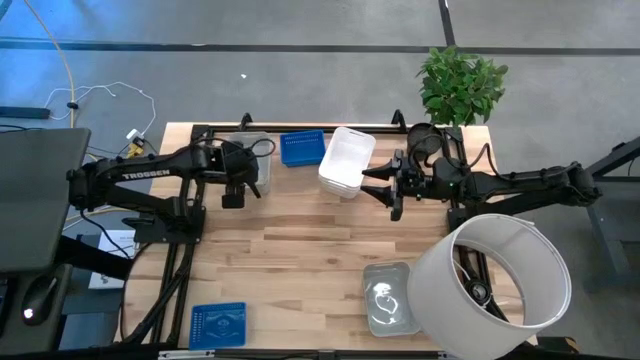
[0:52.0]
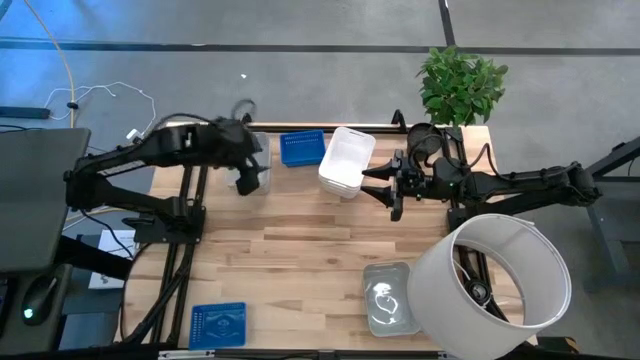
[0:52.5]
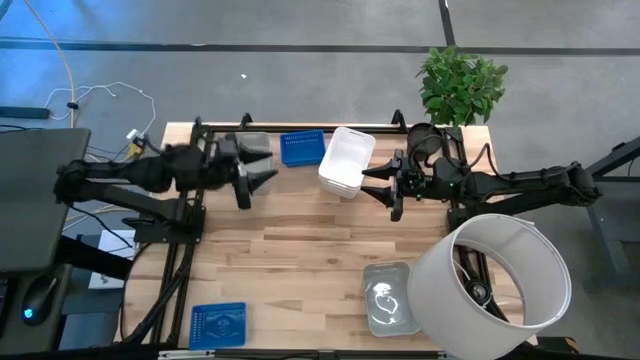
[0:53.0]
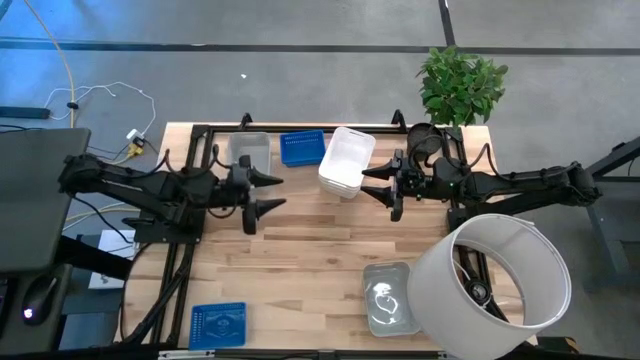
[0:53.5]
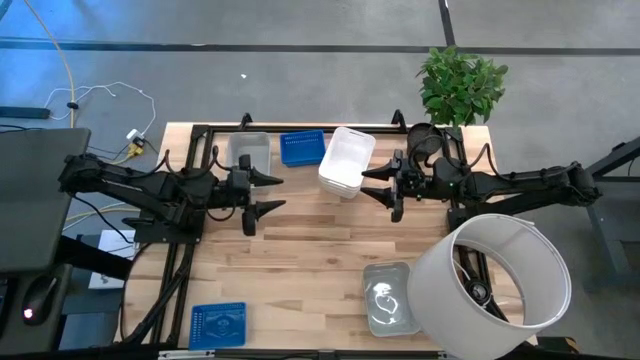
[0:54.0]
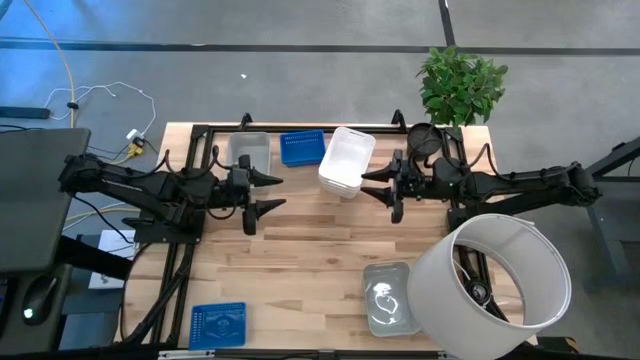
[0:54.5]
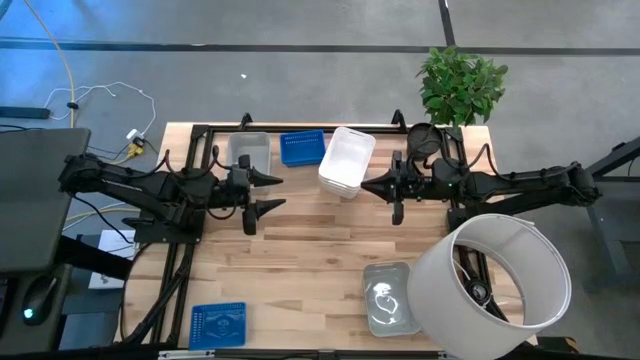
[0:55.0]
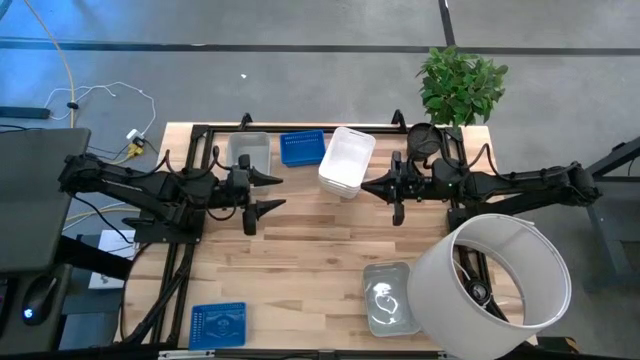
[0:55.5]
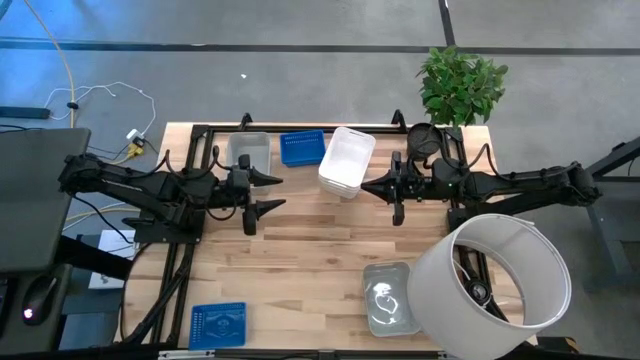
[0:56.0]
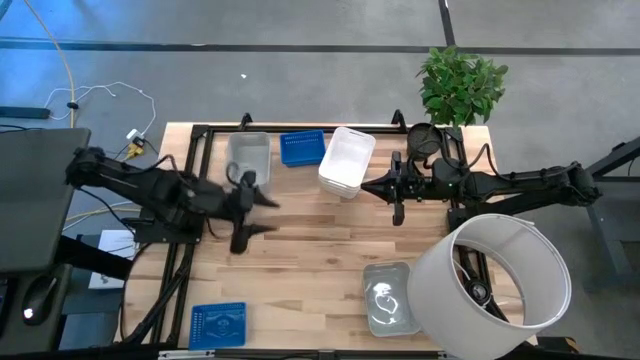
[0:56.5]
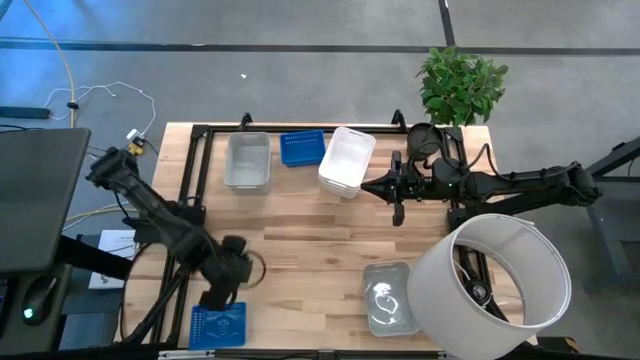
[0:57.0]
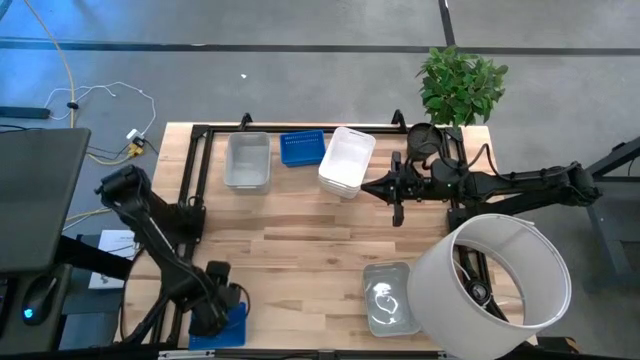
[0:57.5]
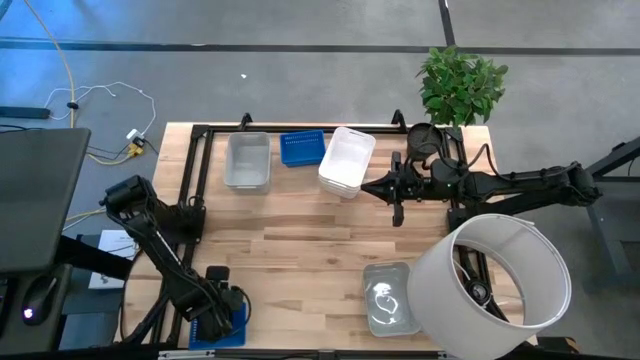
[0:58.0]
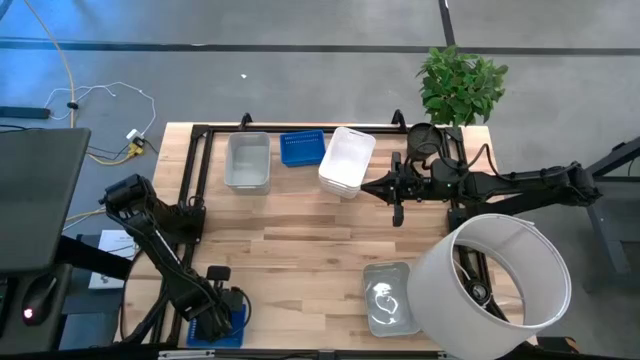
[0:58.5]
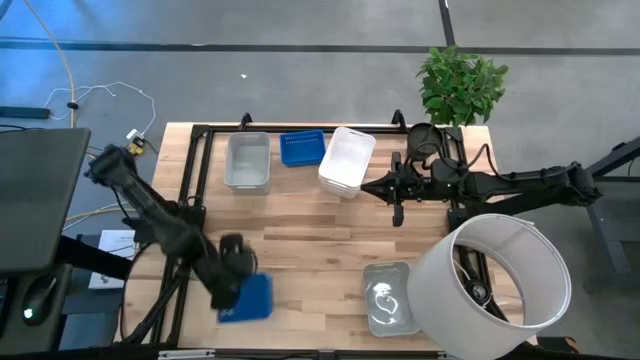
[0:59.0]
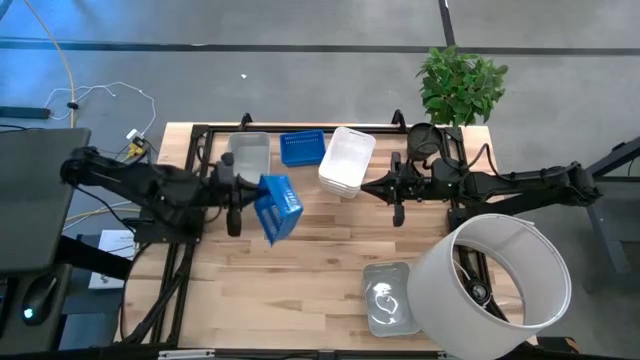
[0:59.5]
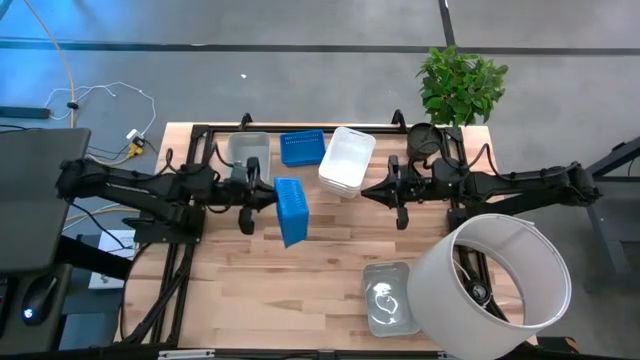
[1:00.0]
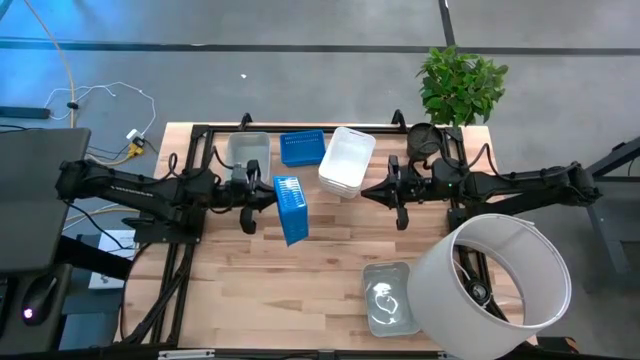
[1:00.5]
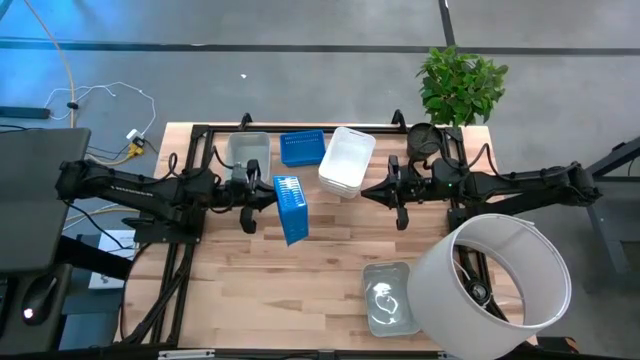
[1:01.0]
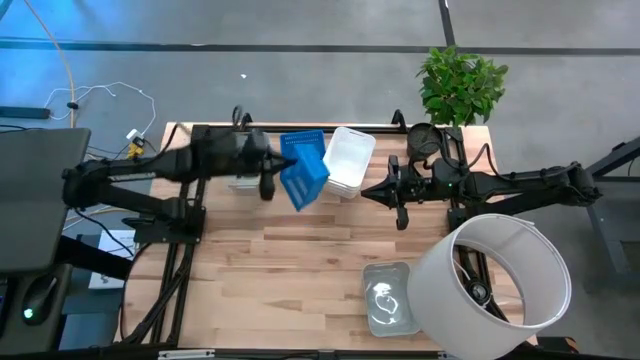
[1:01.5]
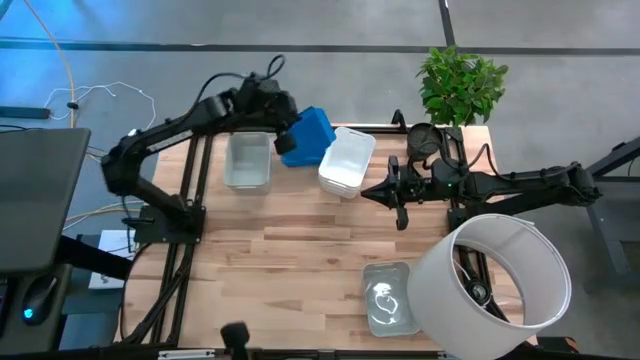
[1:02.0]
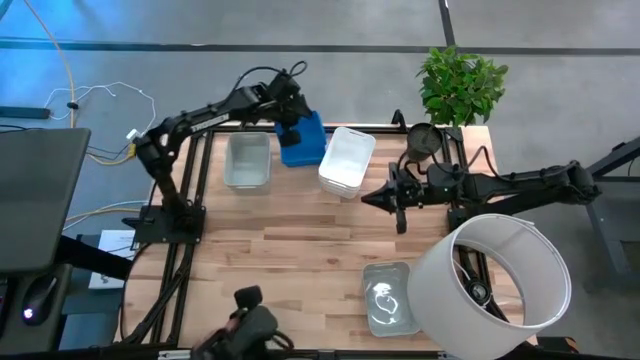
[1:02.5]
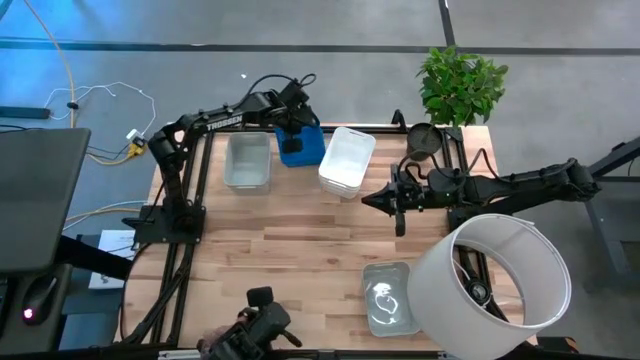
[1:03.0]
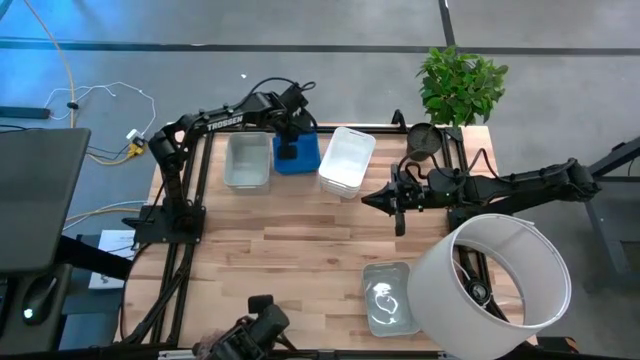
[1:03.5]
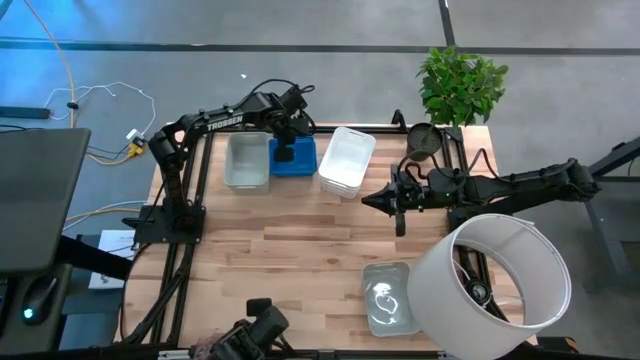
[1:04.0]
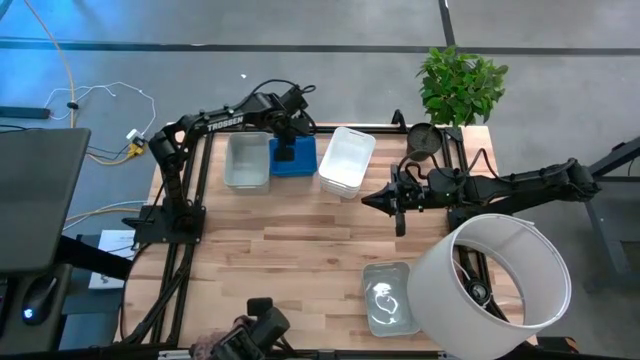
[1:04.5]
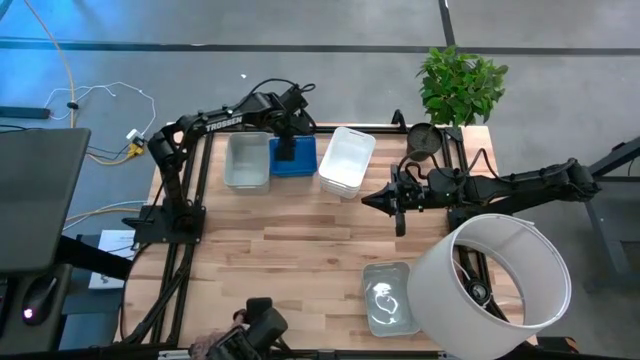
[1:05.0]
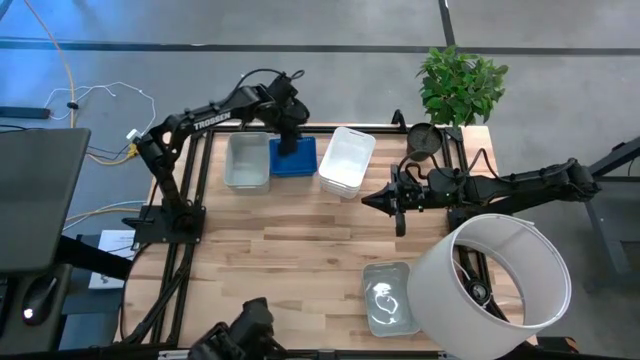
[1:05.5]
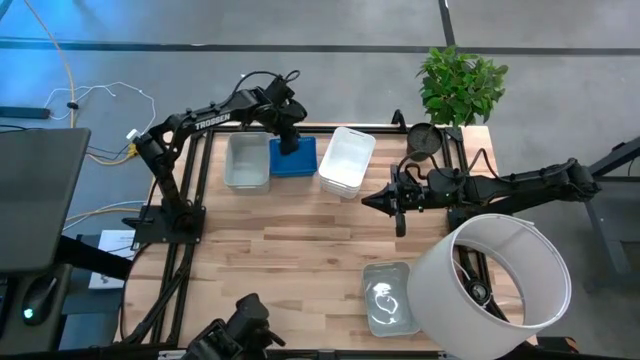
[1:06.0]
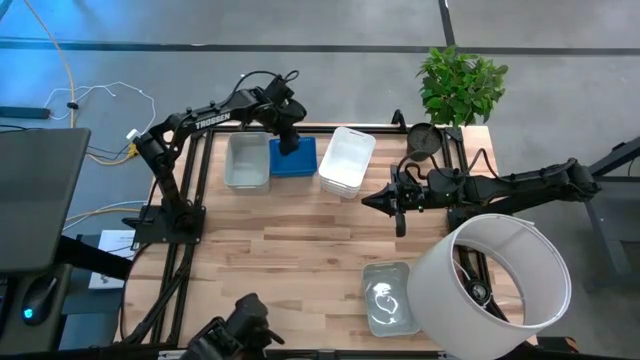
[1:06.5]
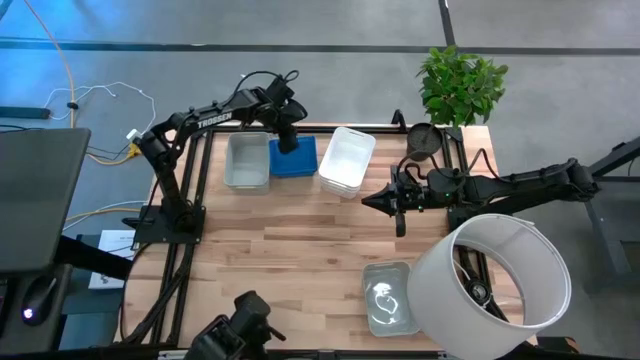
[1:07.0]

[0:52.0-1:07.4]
Stack the bottom blue bin on the top blue bin
